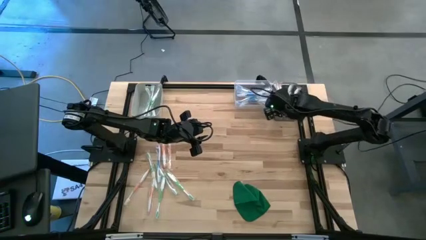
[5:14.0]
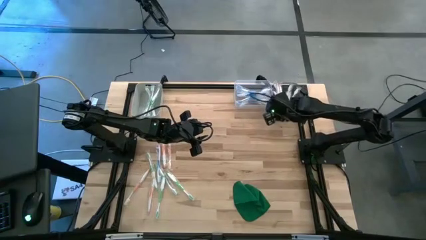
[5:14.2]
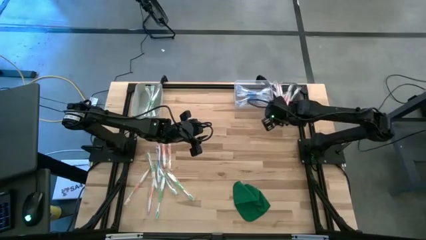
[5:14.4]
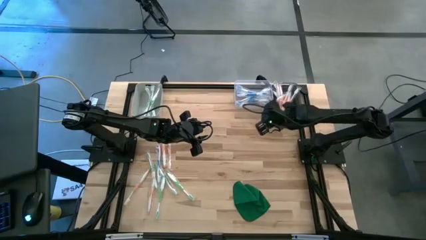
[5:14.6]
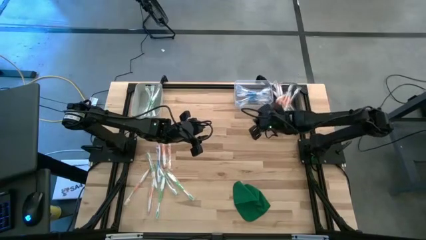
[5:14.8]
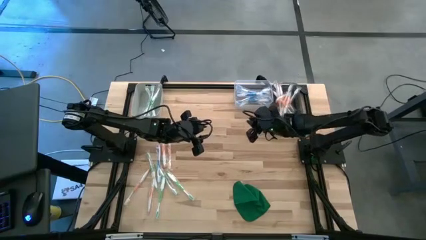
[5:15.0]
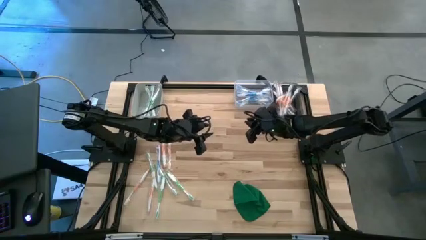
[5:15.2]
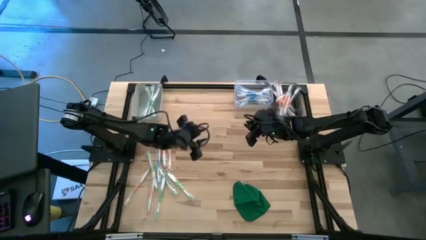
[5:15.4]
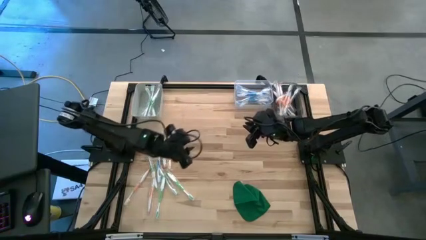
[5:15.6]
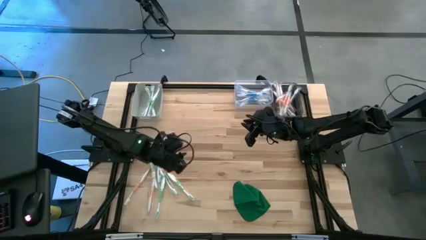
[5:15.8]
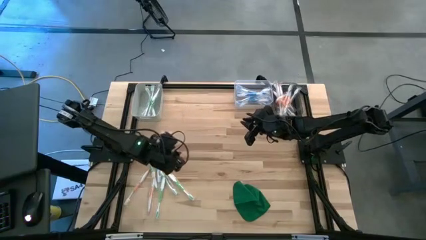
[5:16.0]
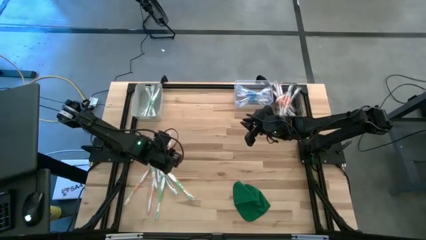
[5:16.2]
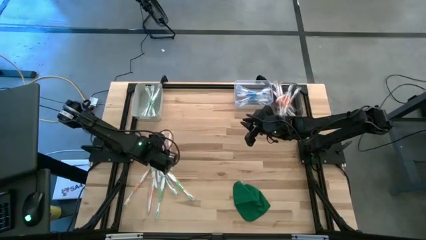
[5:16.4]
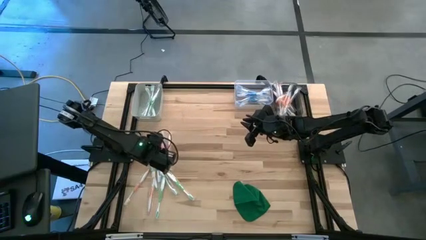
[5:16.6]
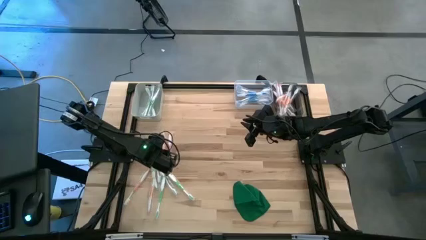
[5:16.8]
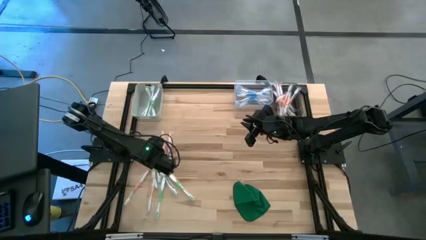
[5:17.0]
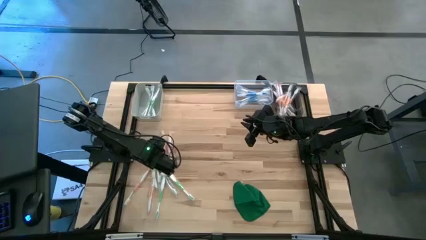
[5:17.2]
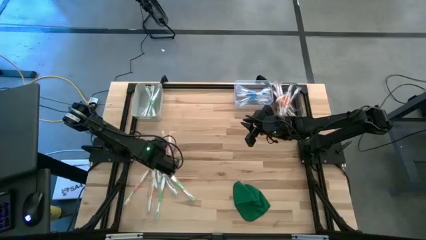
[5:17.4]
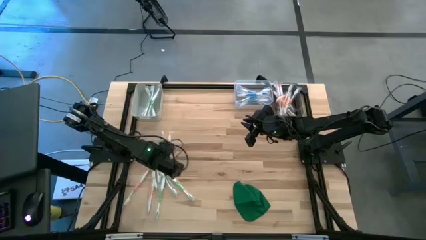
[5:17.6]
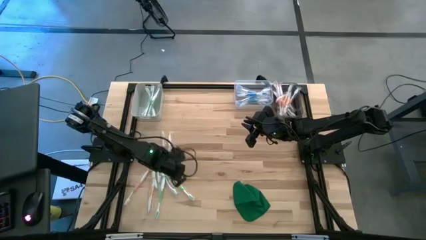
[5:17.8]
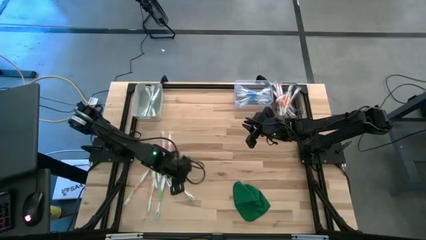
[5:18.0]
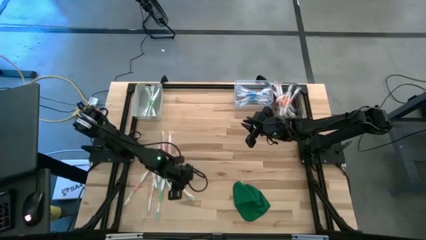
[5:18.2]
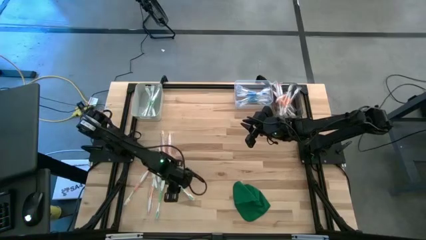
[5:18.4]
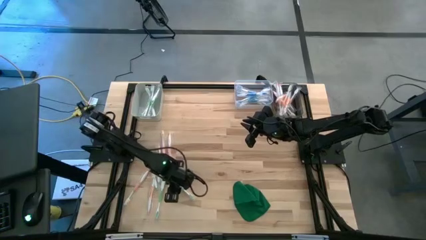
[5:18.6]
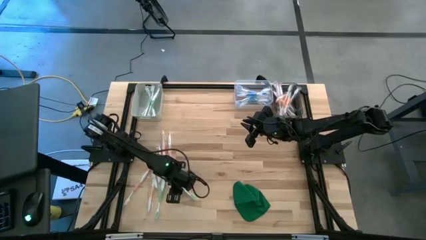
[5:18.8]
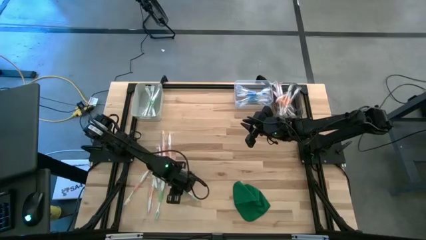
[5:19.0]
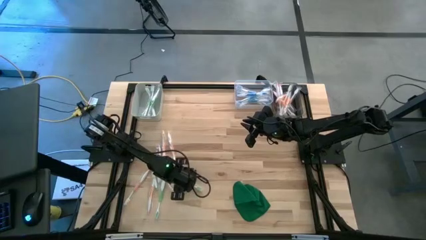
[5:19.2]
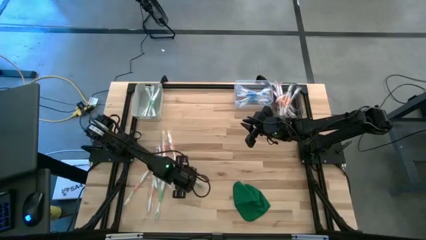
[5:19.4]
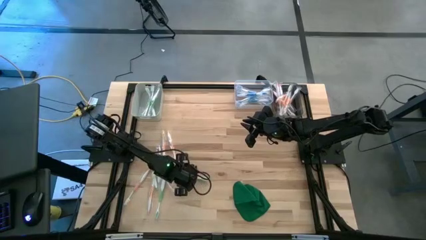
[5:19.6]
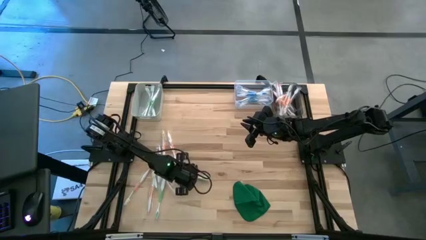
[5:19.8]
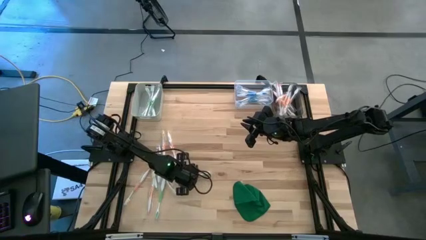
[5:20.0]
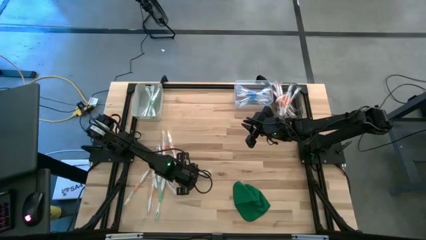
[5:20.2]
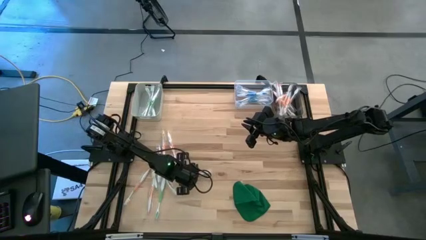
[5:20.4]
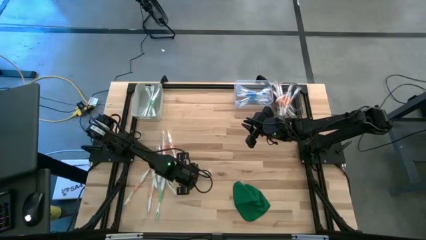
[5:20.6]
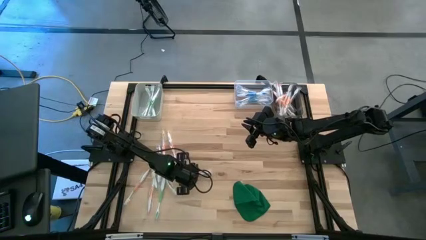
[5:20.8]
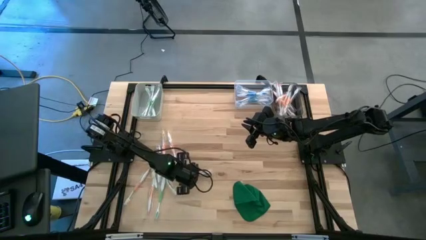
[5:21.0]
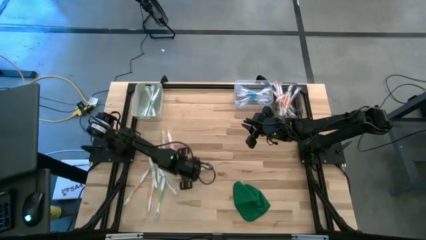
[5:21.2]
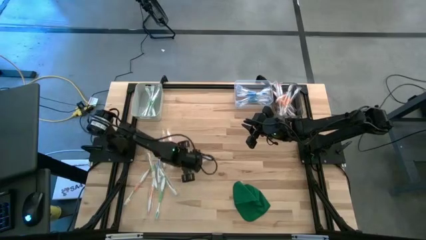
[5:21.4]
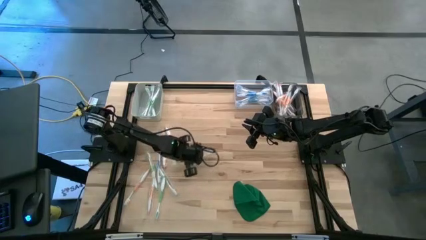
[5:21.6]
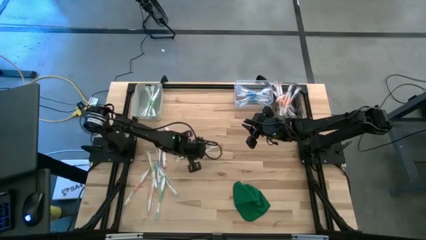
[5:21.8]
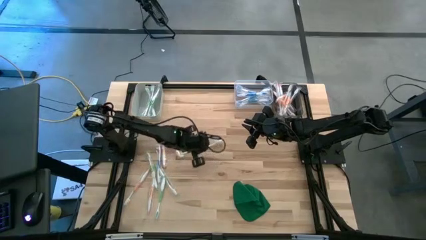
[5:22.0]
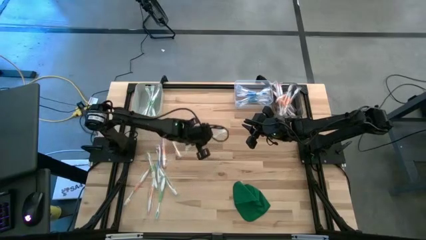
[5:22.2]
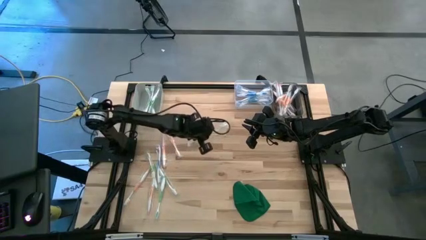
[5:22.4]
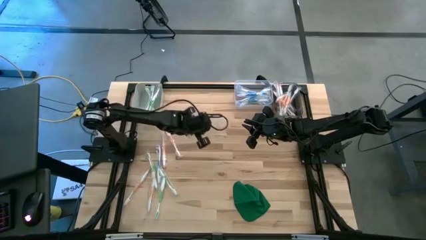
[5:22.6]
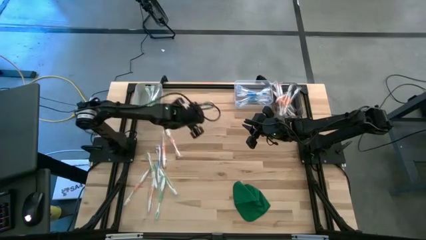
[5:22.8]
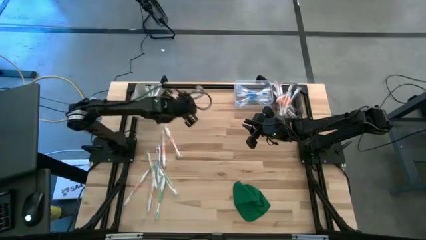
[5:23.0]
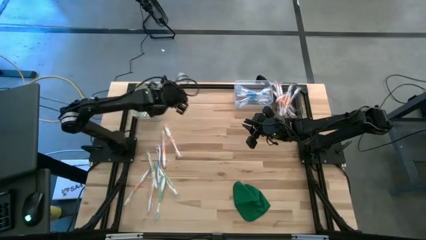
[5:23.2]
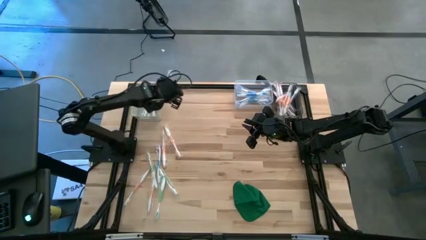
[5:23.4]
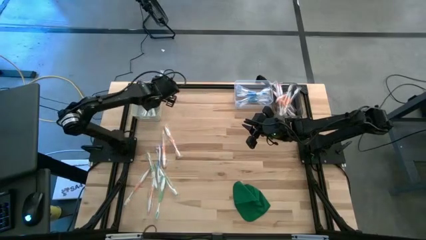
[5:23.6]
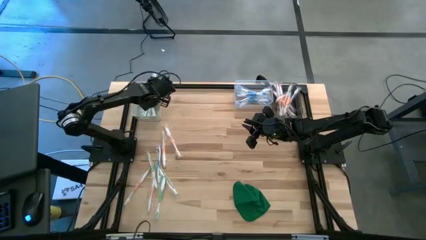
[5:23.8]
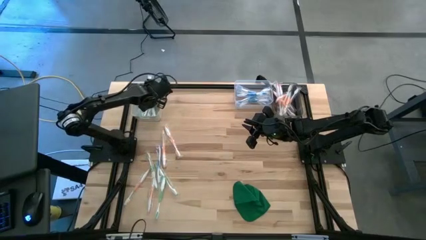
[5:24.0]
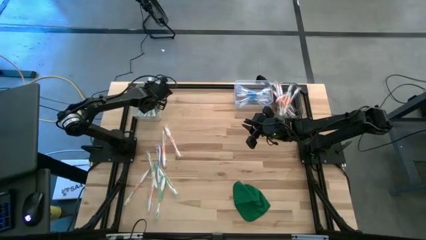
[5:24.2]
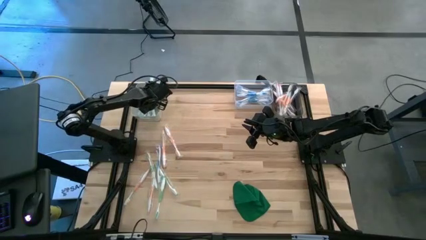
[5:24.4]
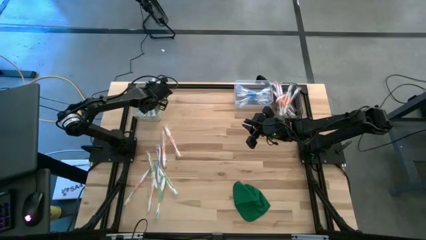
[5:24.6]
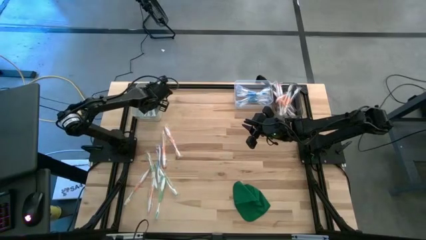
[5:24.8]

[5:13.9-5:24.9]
Task: Pick & Place Toothbrushes
Put the green toothbrush into the gray bin
